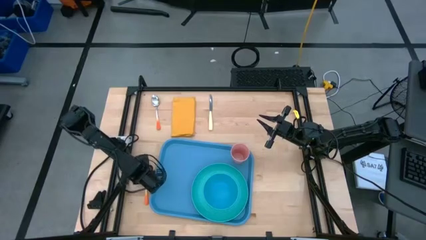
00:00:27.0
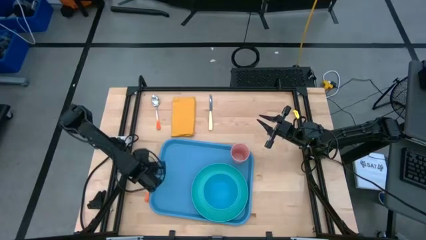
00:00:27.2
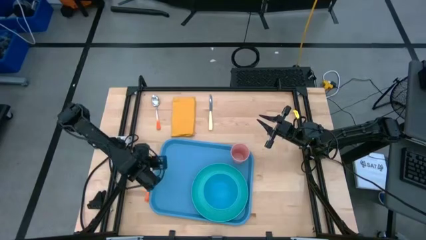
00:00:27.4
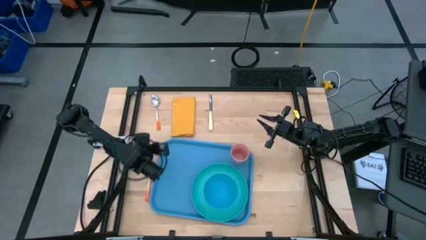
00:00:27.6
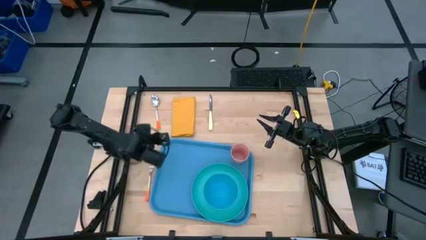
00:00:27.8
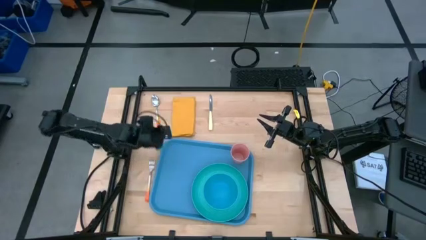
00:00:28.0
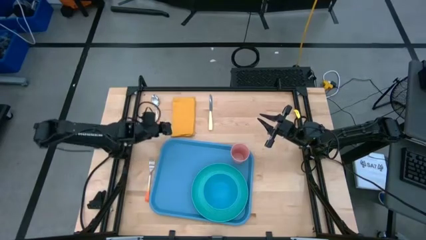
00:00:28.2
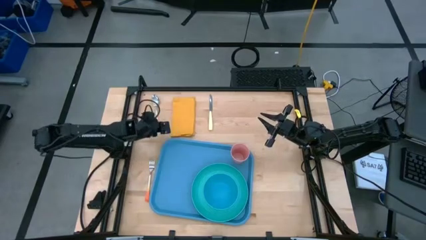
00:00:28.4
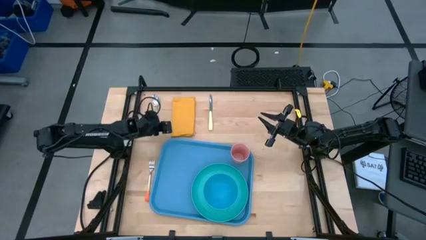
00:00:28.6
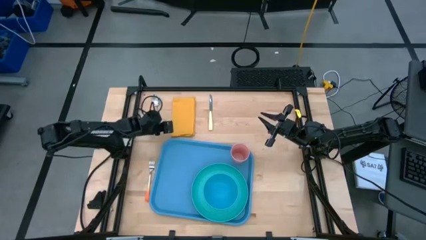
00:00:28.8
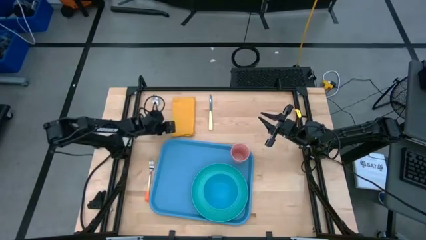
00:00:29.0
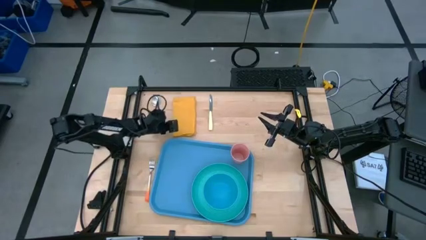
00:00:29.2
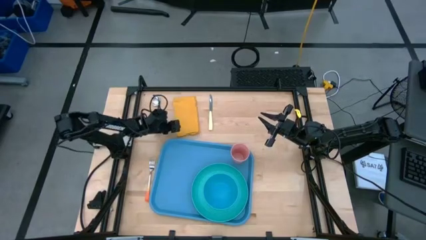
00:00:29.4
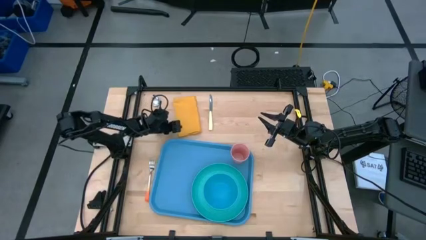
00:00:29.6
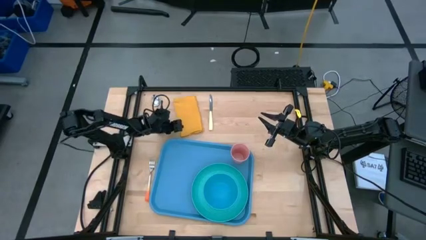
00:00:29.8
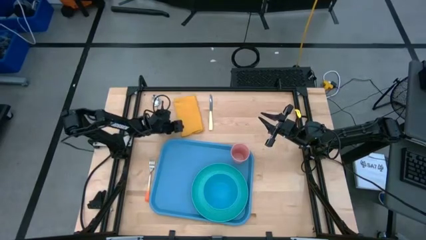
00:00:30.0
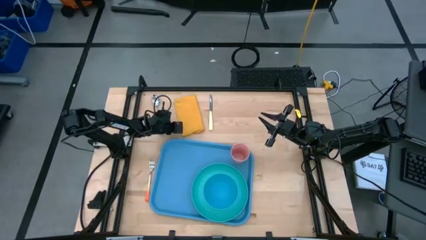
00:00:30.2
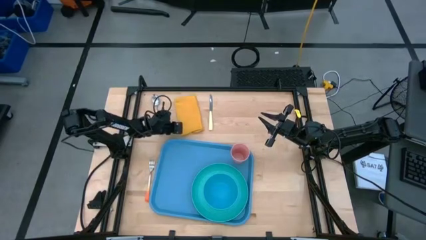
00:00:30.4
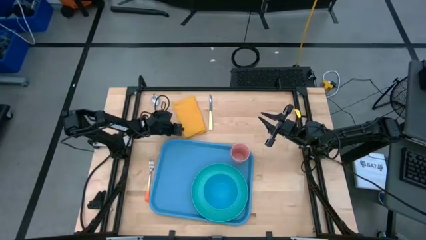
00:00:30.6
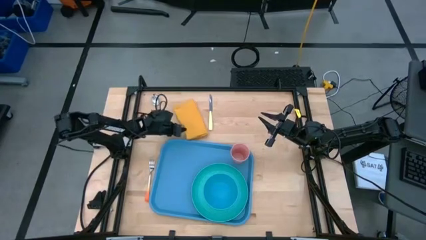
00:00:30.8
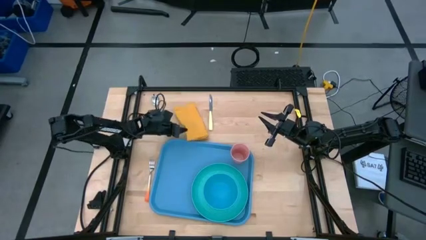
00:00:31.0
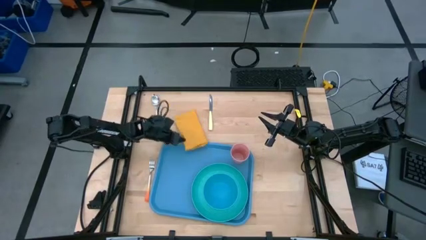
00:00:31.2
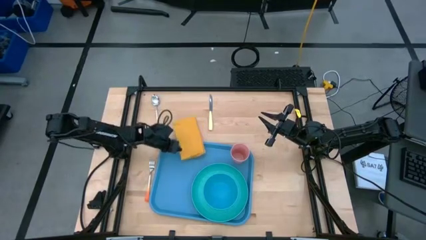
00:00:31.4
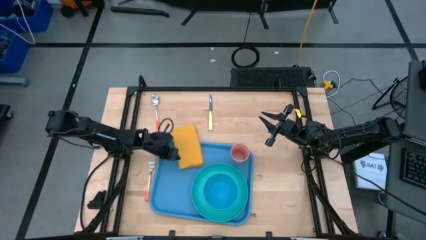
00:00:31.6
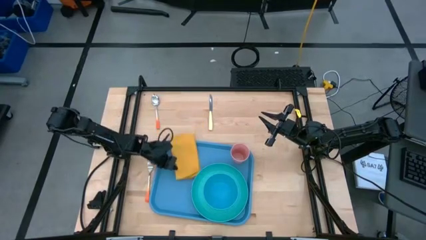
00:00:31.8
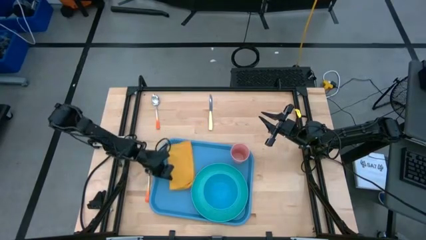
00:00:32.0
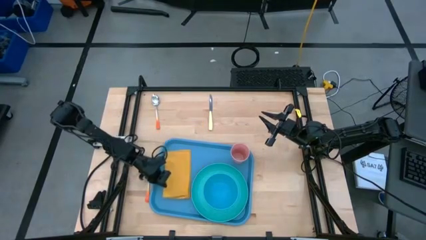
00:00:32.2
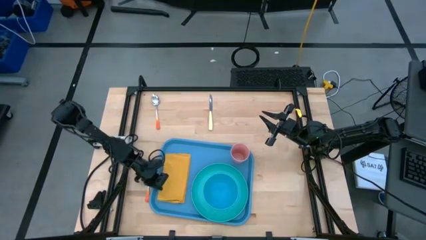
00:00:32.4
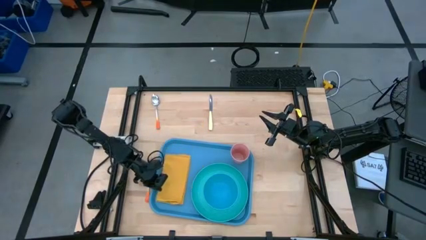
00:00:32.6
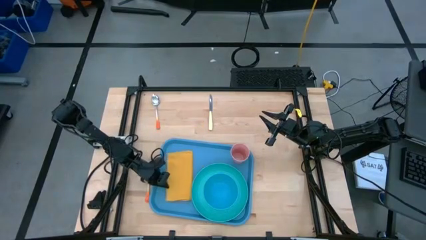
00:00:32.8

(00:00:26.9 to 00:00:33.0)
Task: Set up tray
Put the orange napkin on the blue serving tray to the left of the blue plate

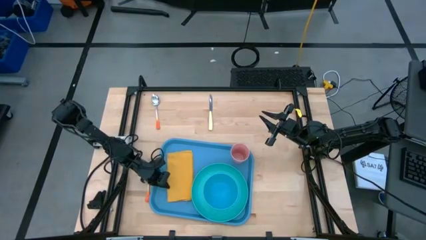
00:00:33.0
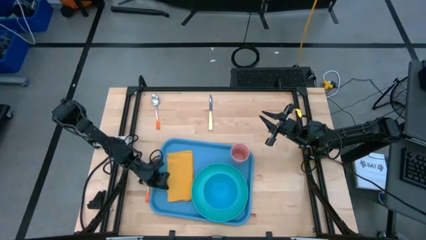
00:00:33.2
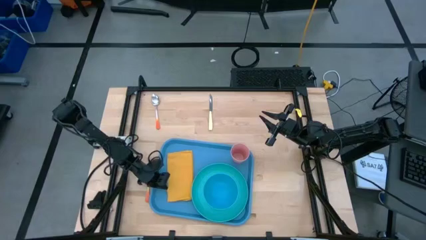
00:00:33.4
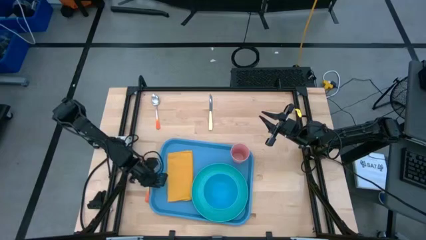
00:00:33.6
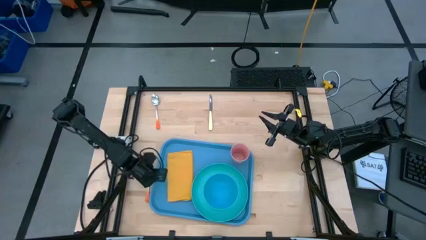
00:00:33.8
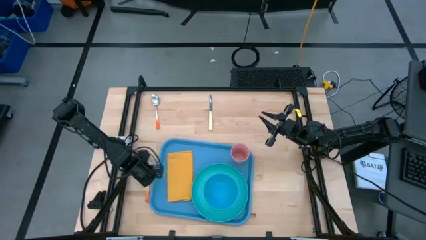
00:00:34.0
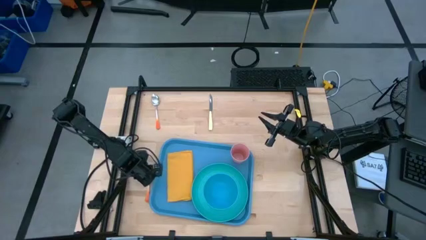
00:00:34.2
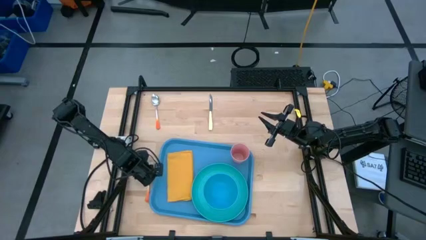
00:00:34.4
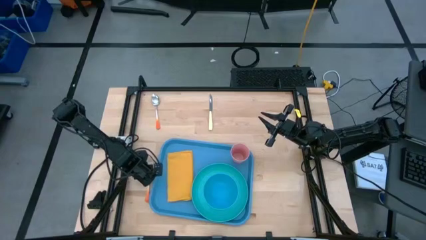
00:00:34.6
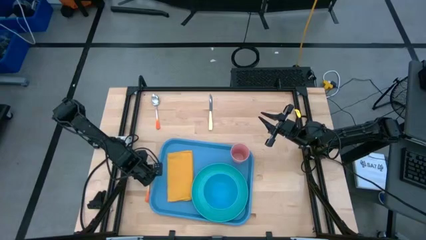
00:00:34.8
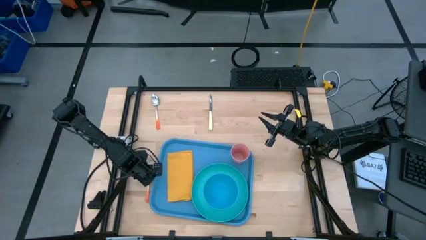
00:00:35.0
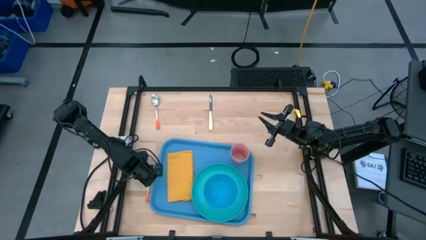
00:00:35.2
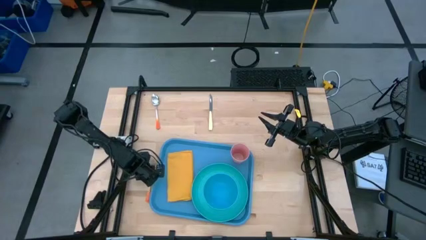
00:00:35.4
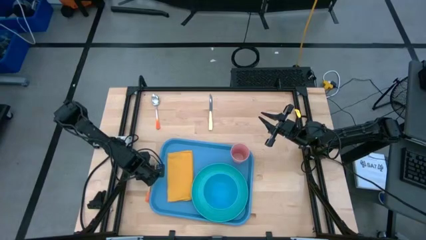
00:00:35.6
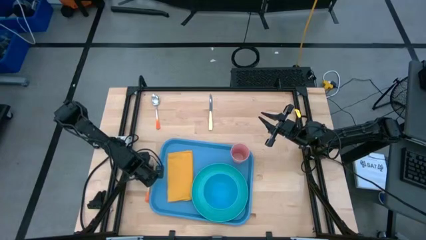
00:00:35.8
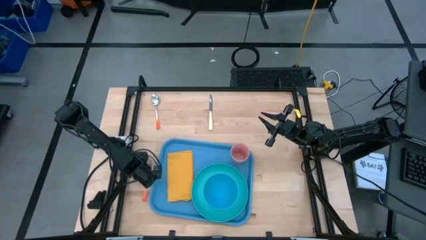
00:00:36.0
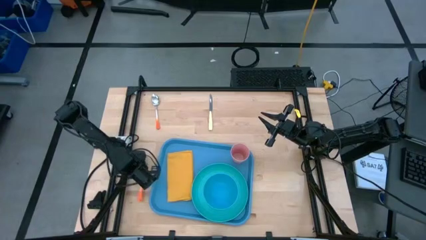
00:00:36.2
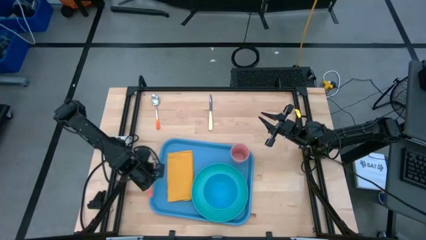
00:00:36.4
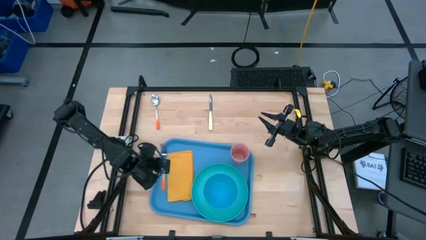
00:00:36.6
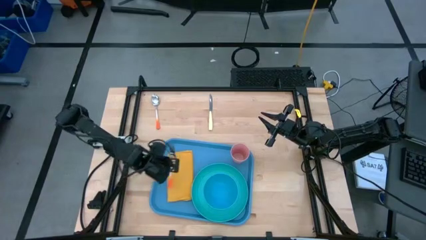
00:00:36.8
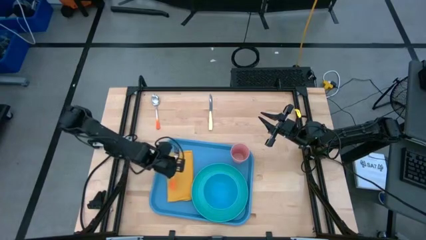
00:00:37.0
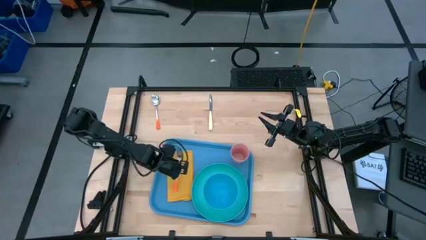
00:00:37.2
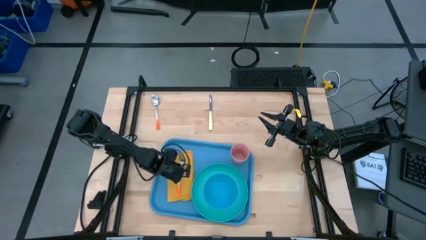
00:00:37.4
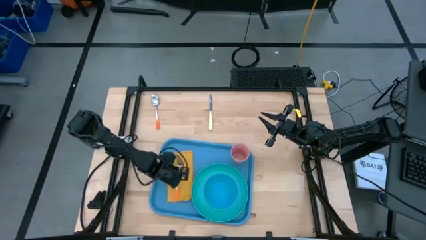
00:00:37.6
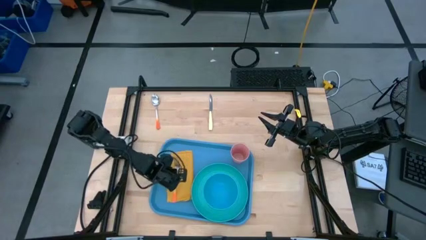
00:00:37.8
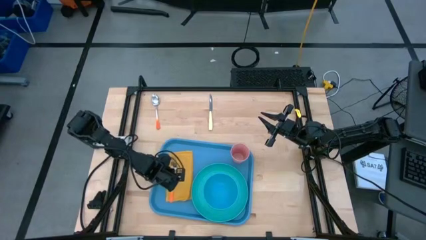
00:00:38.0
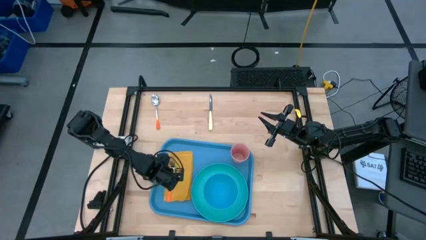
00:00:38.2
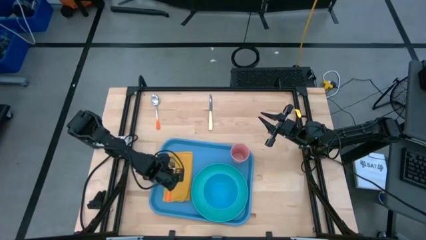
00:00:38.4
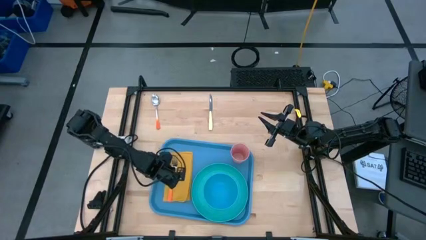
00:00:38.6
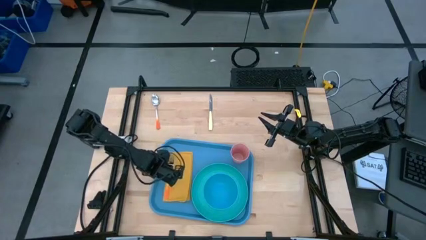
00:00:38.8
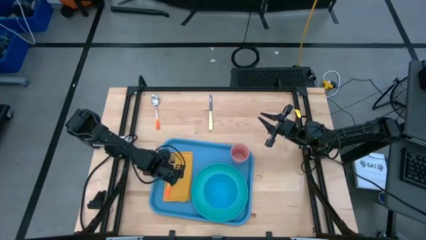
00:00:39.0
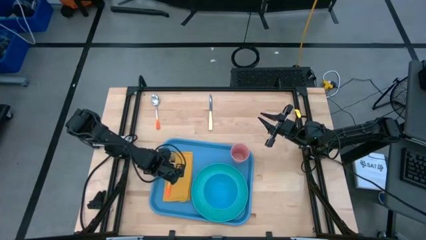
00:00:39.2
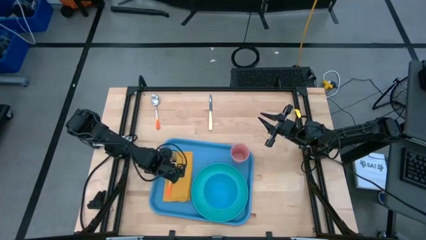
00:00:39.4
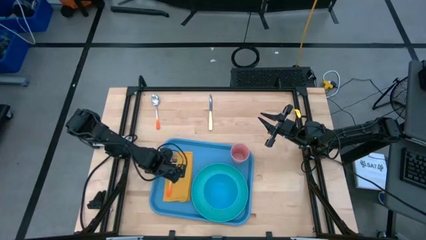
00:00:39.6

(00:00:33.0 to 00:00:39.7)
Put the orange fork on the orange napkin

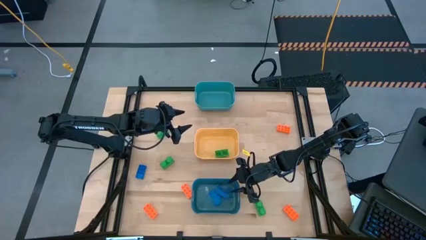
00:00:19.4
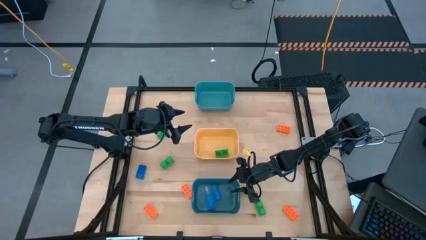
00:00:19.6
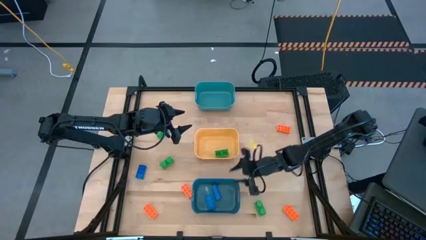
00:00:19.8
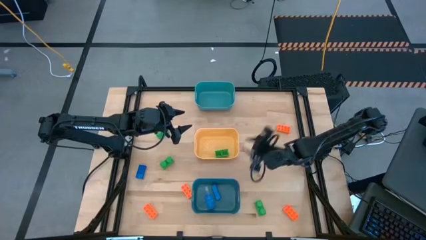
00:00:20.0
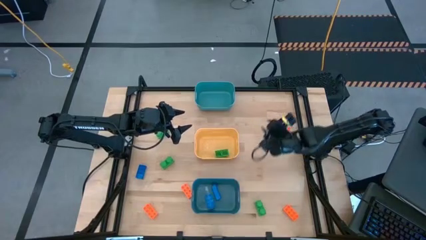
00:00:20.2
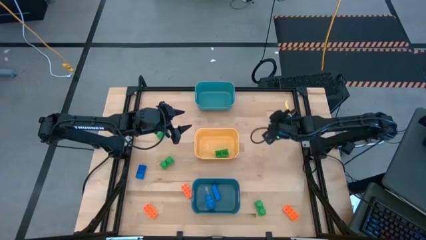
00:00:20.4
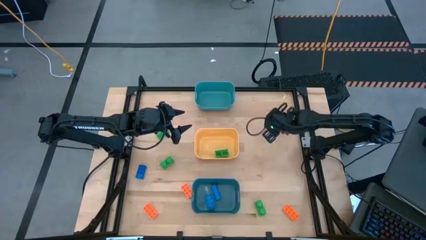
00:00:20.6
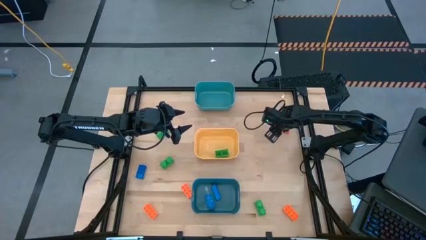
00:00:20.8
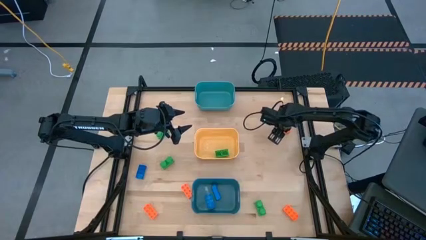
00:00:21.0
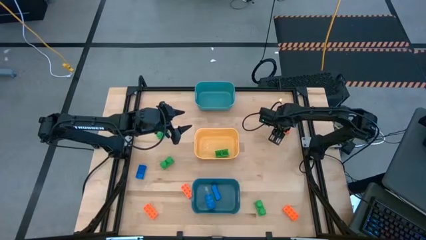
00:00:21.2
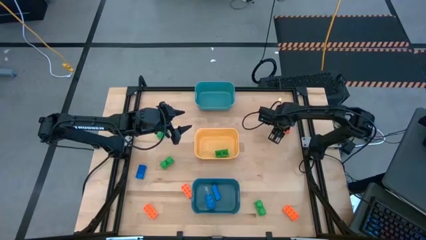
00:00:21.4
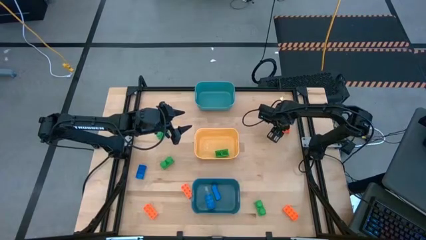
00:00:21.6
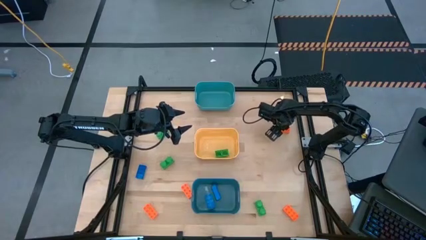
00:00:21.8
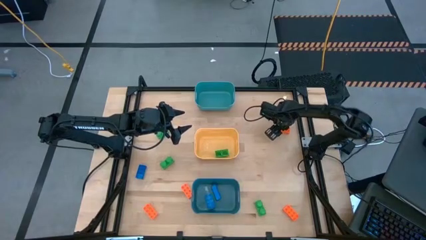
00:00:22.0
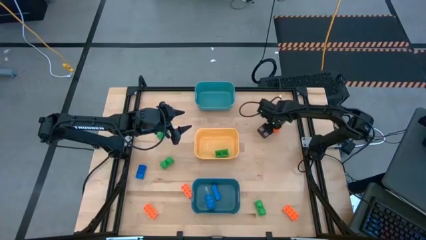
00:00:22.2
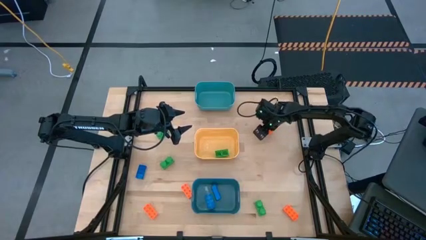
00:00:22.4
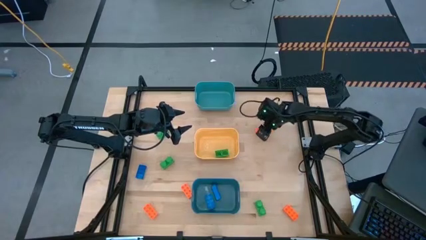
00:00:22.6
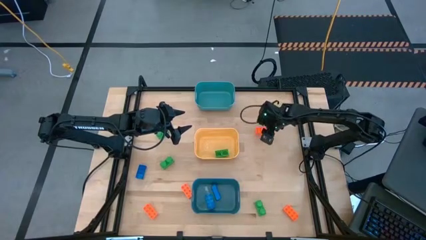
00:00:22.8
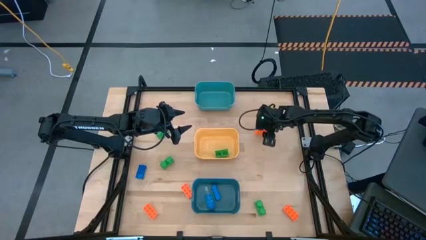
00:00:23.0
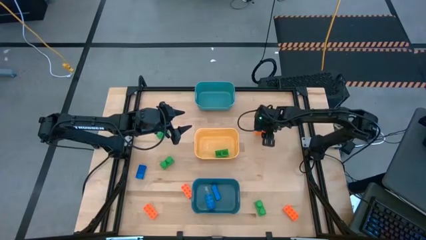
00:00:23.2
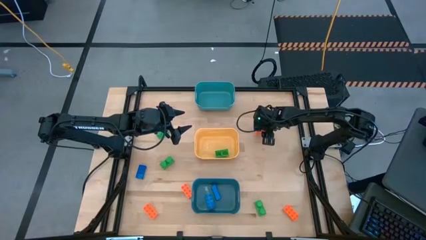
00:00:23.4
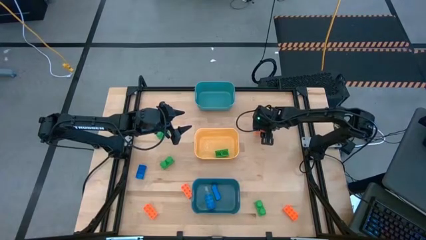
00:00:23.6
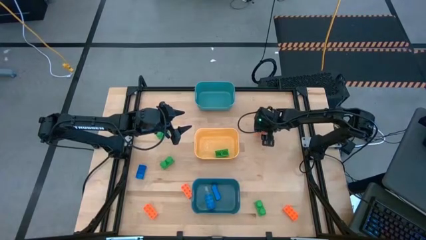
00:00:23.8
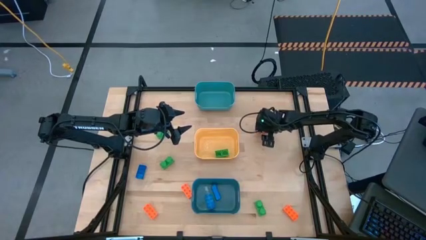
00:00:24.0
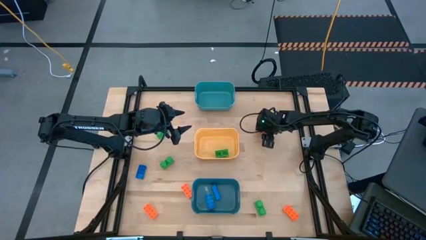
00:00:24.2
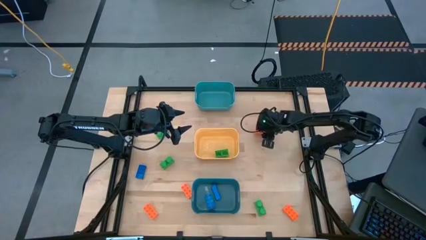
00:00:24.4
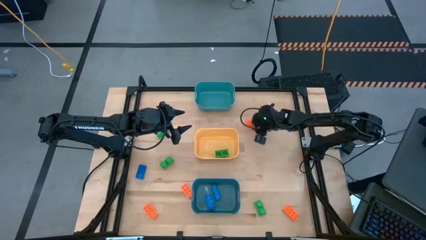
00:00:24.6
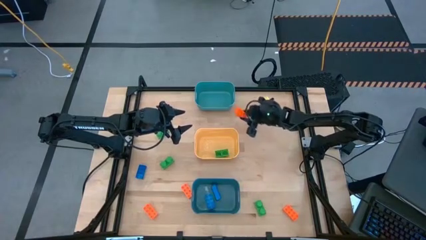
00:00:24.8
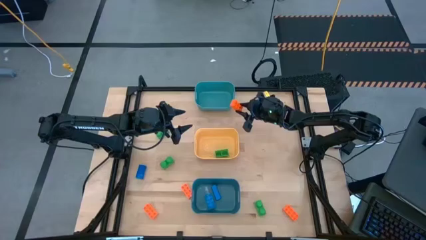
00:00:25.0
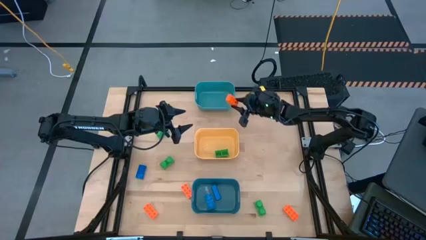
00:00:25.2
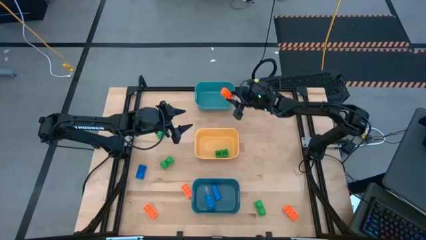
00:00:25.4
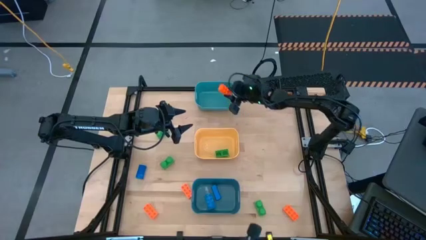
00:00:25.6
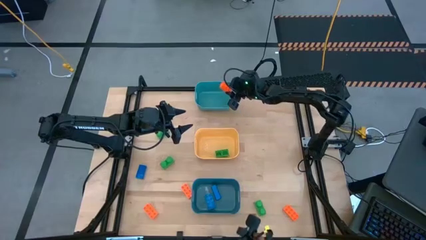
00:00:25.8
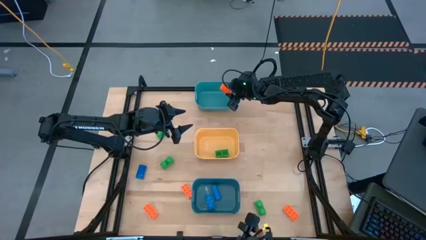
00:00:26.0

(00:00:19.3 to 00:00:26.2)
Task: Sort & place blocks by color
Put the orange game piece into the green bin
